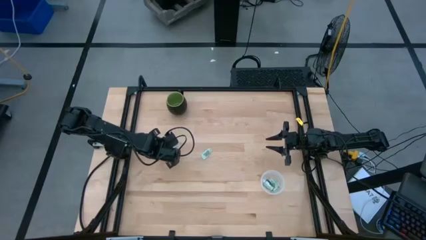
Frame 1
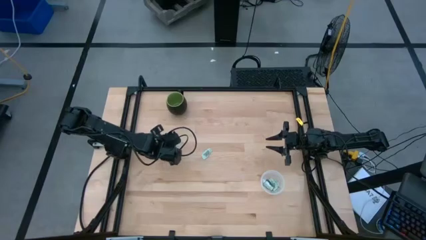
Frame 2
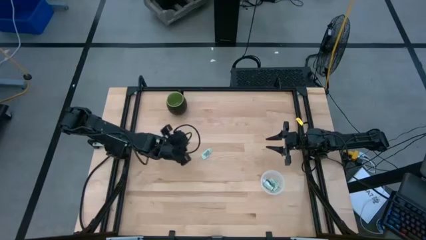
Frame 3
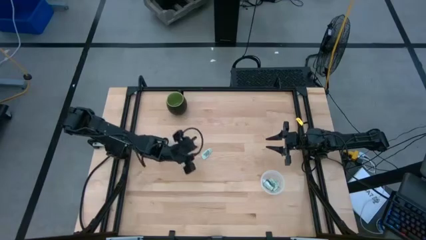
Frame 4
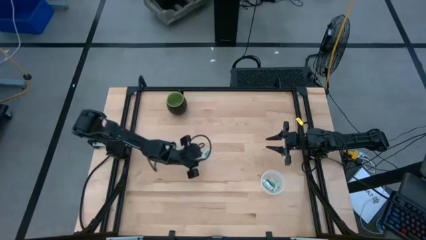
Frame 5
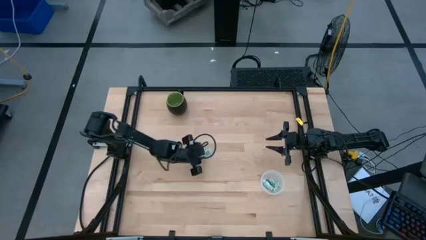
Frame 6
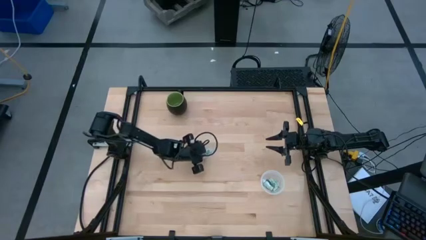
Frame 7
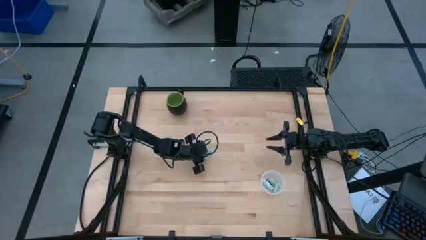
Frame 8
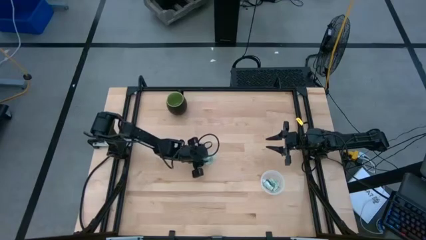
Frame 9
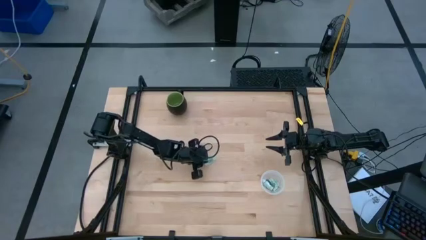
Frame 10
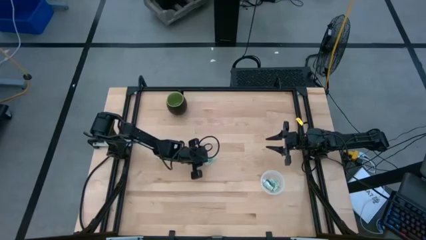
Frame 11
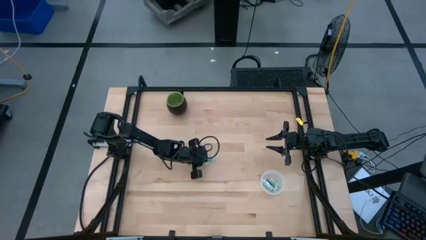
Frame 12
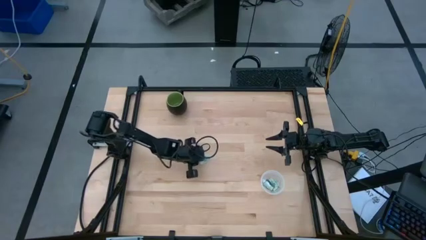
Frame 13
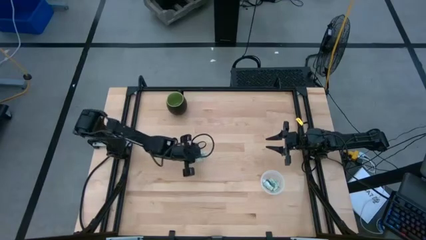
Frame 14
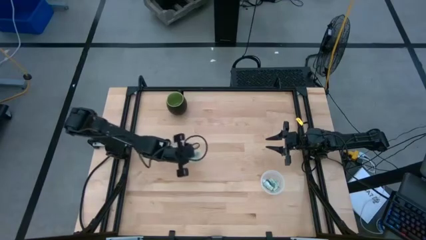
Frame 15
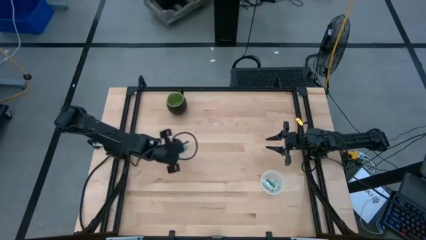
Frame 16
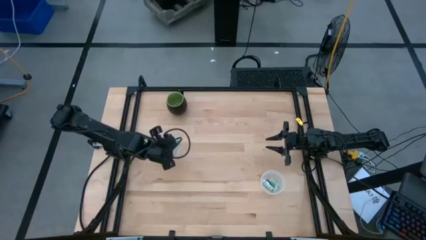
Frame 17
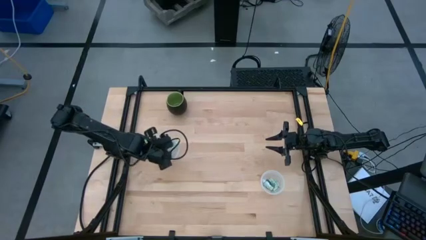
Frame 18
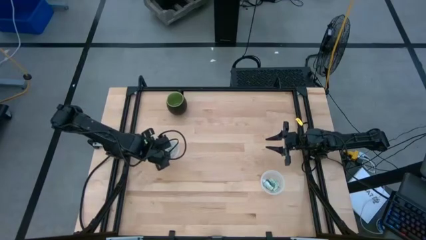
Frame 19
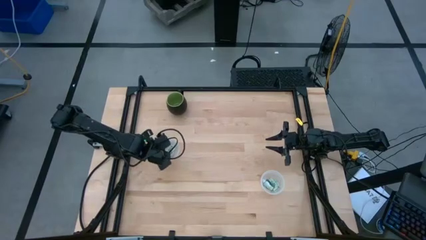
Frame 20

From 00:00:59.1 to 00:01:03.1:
Task: Pick and place Stevia / Truvia into bins
Put the white stevia packet into the left transparent container

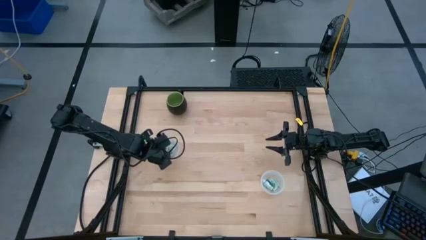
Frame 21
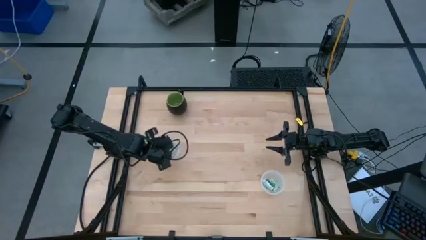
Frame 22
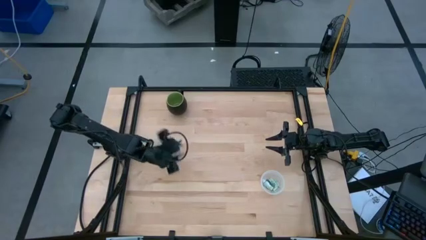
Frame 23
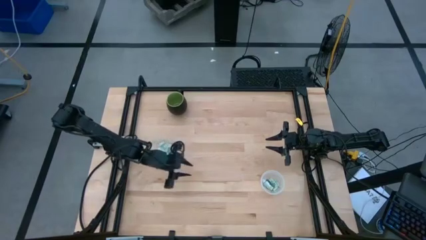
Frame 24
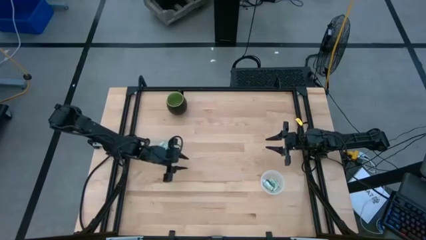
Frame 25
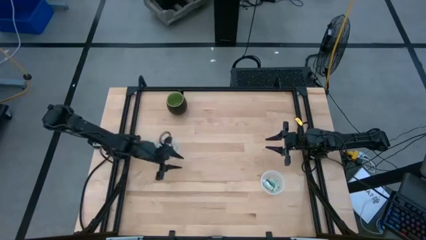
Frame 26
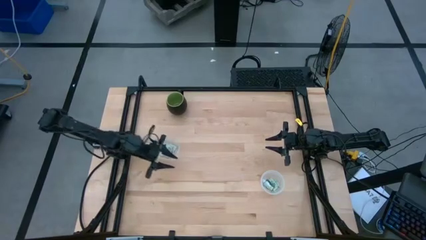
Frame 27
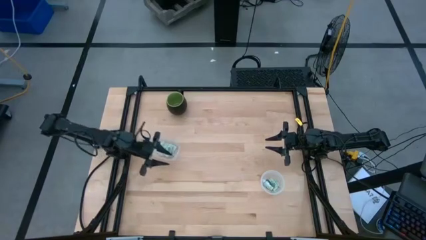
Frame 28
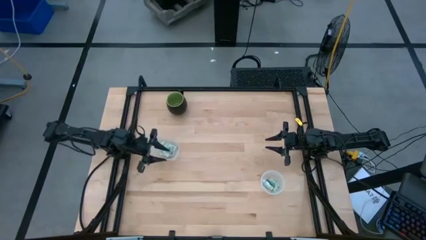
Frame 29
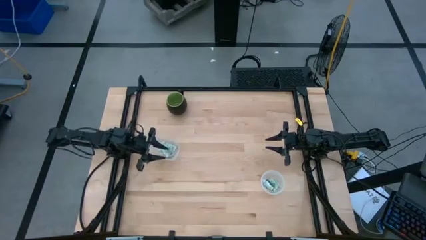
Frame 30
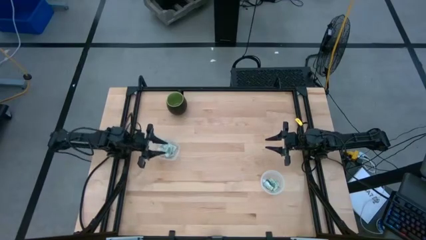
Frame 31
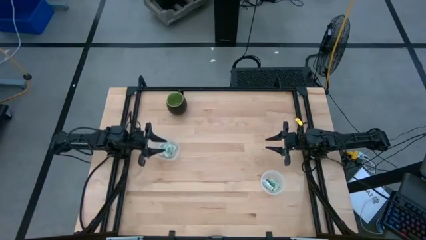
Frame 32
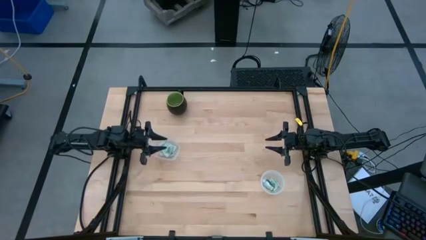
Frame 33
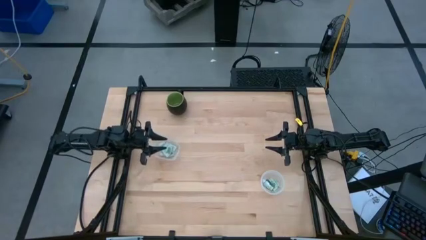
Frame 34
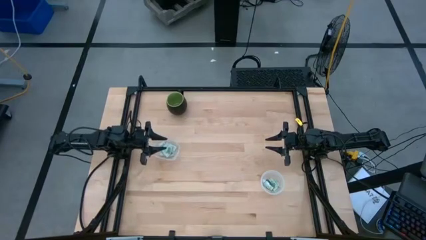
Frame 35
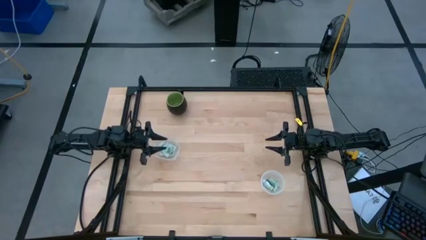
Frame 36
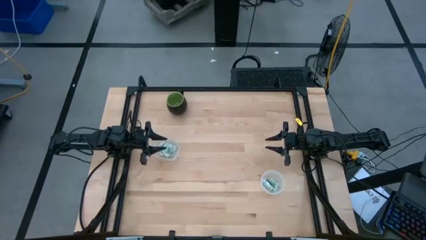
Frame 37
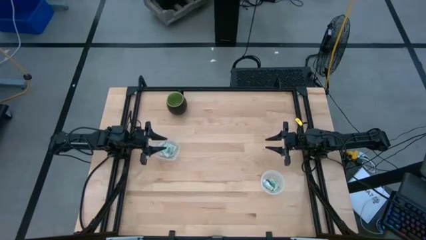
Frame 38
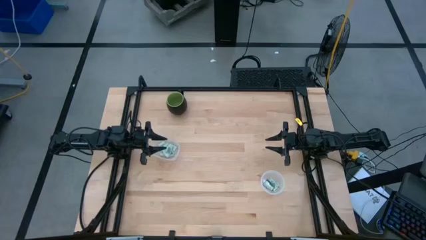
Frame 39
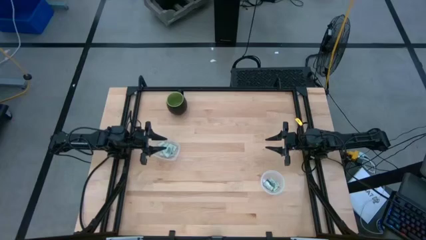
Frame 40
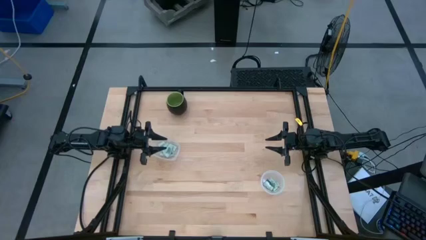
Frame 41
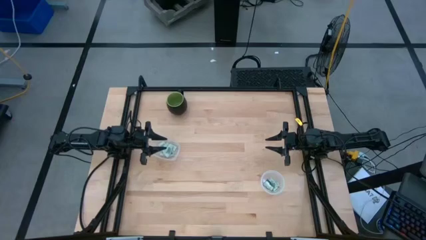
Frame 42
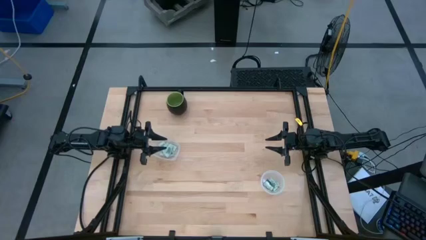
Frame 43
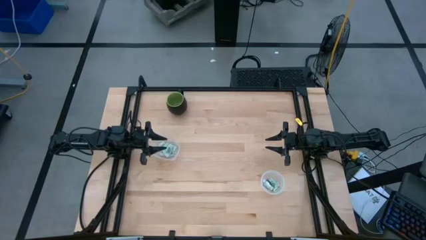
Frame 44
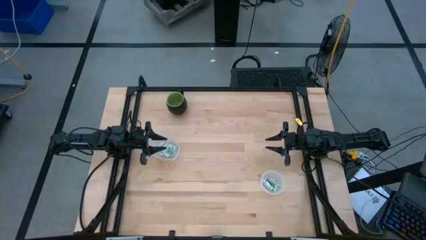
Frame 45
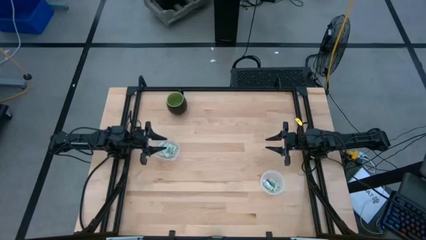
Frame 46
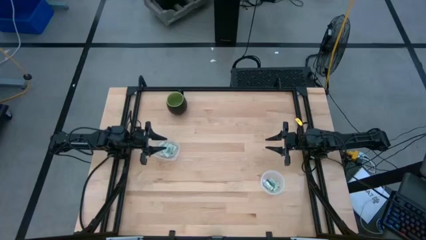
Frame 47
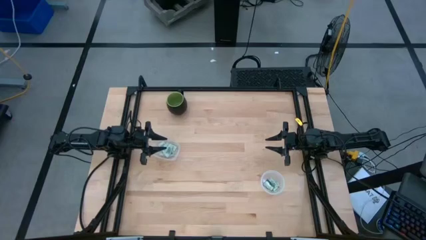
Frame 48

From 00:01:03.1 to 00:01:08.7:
Return to Home Position

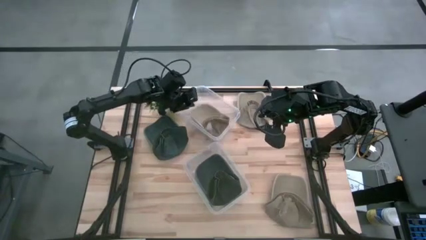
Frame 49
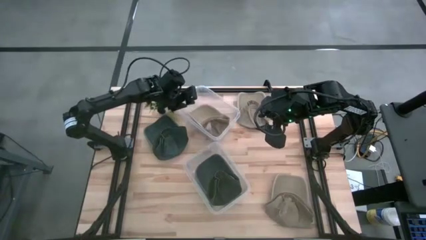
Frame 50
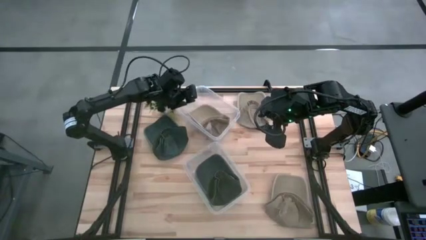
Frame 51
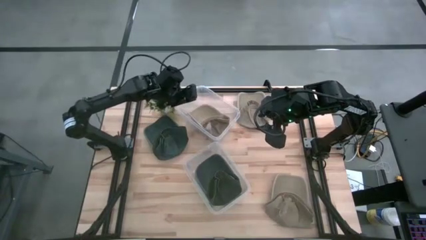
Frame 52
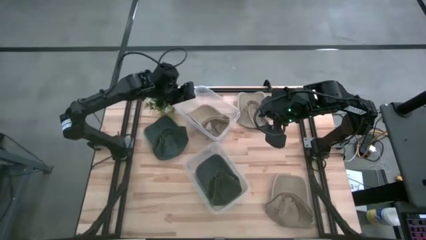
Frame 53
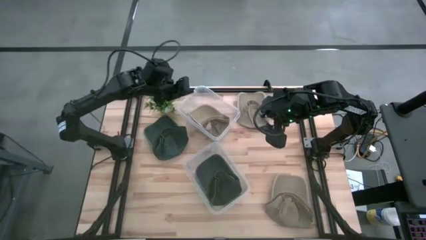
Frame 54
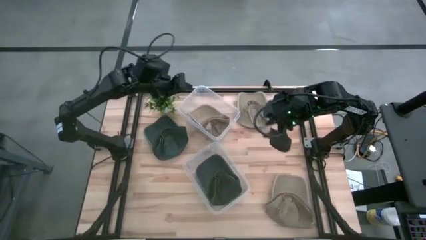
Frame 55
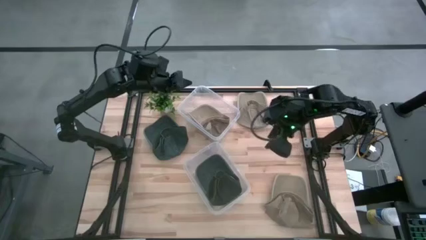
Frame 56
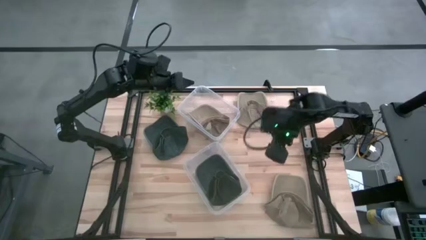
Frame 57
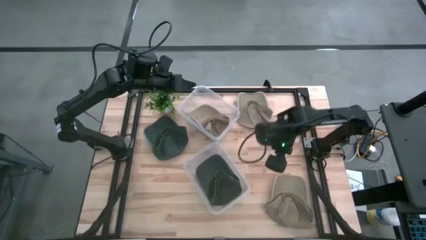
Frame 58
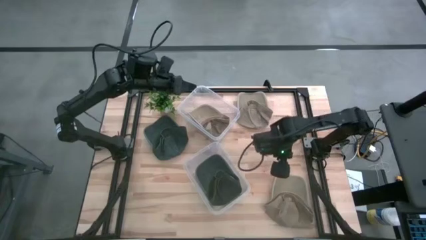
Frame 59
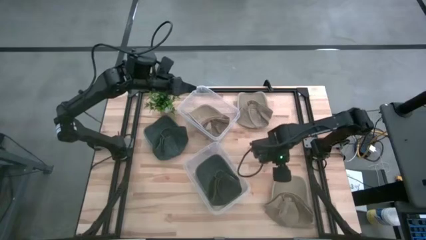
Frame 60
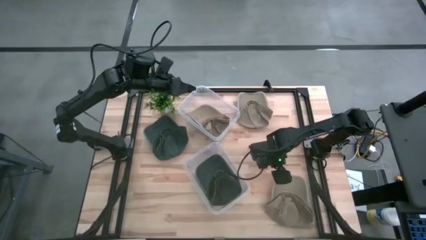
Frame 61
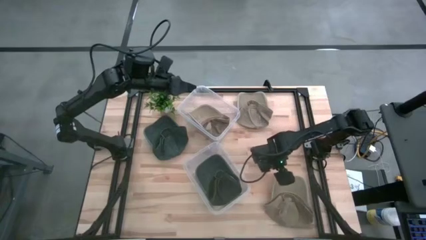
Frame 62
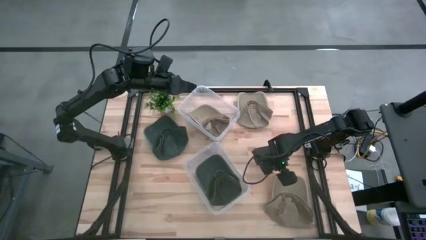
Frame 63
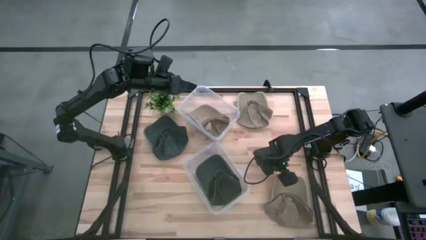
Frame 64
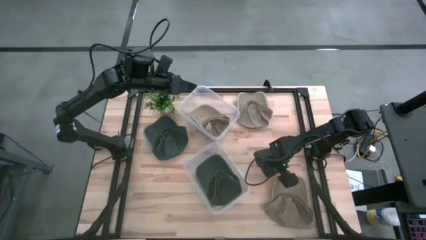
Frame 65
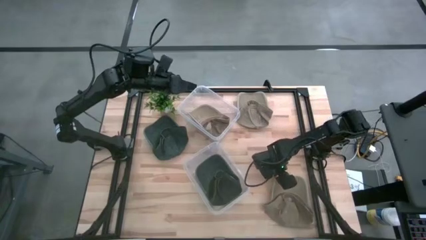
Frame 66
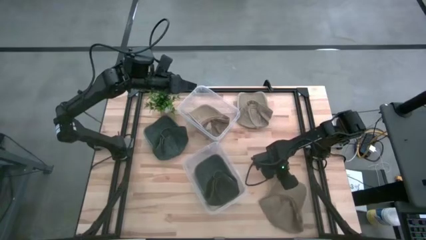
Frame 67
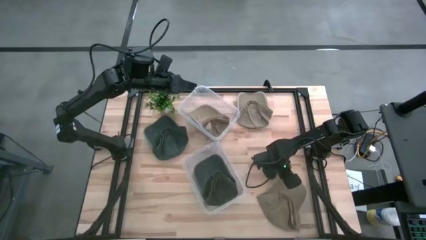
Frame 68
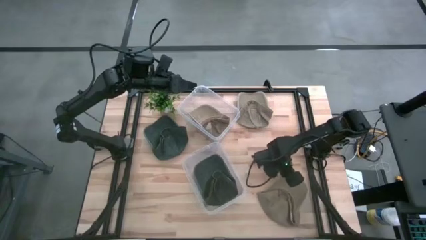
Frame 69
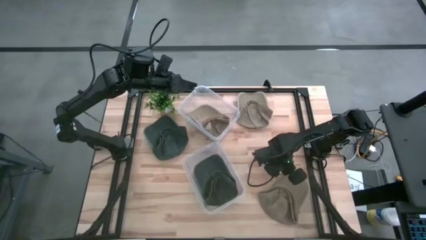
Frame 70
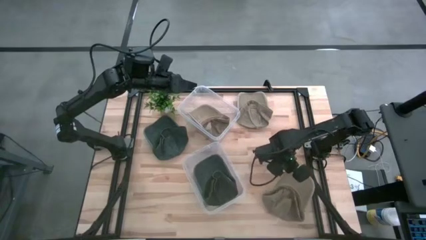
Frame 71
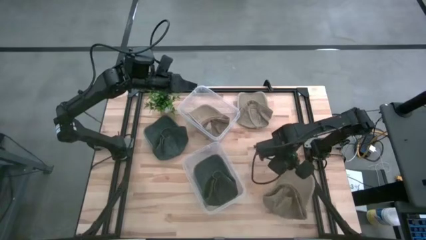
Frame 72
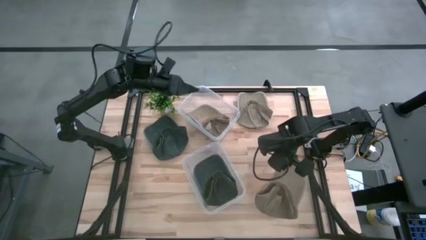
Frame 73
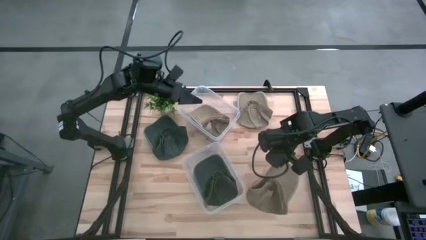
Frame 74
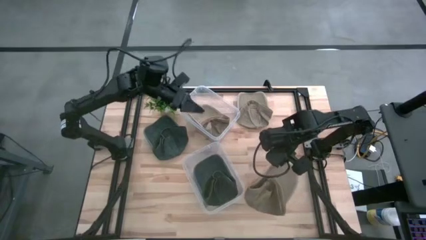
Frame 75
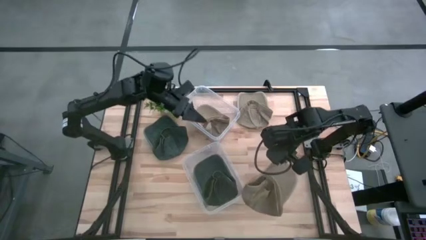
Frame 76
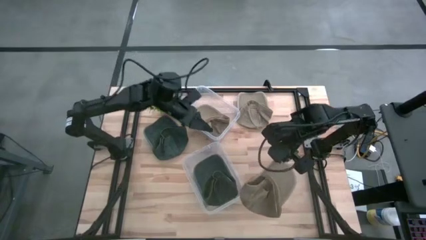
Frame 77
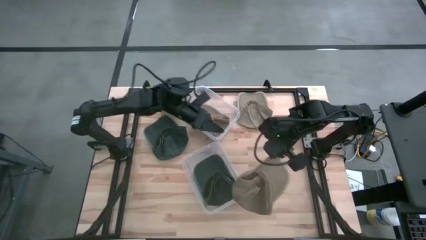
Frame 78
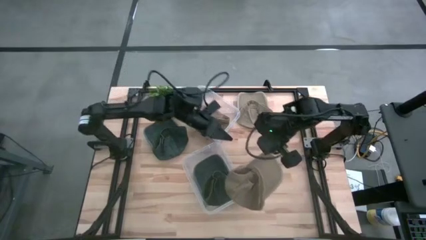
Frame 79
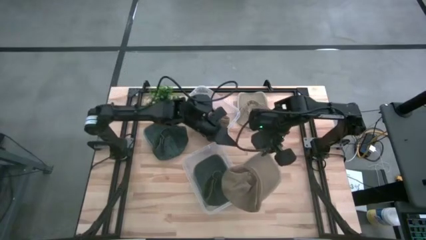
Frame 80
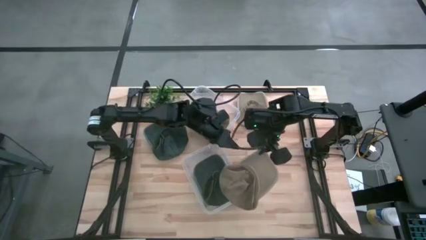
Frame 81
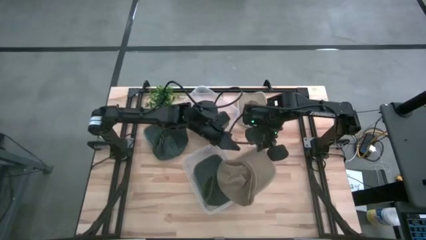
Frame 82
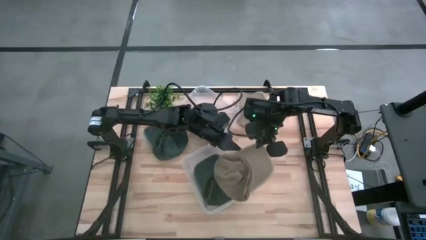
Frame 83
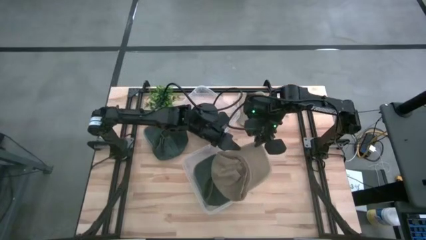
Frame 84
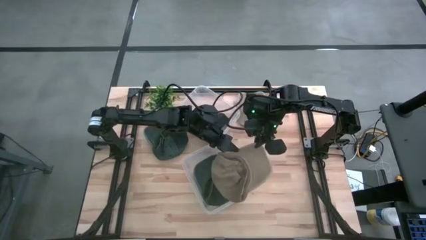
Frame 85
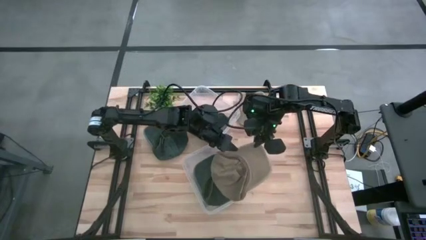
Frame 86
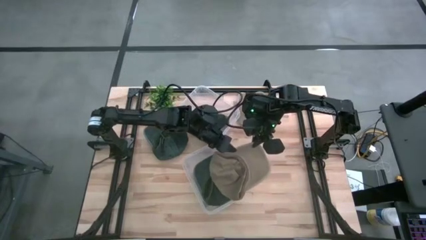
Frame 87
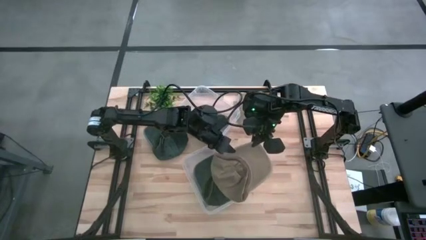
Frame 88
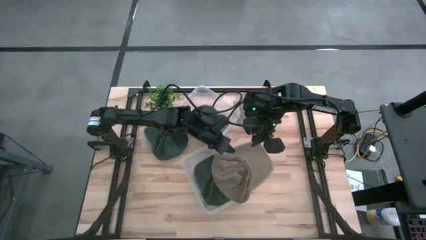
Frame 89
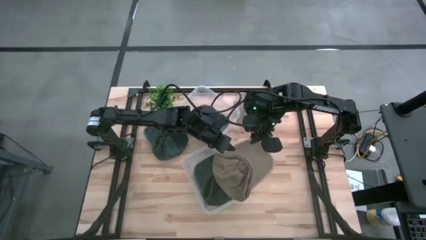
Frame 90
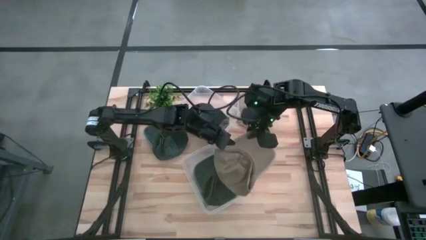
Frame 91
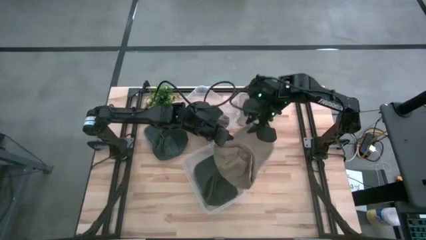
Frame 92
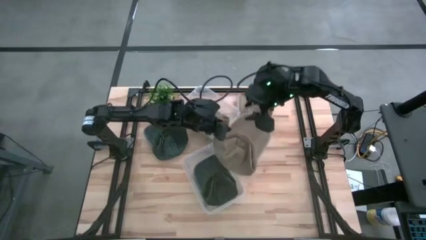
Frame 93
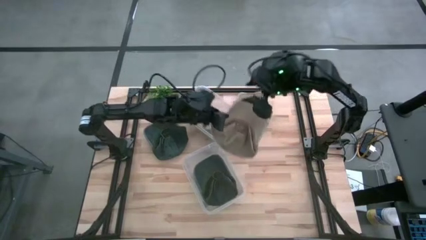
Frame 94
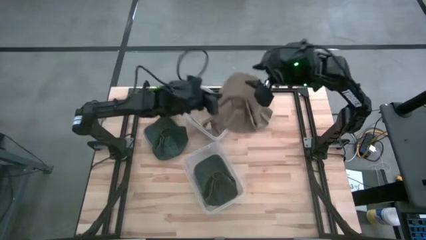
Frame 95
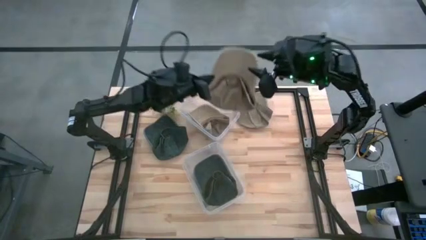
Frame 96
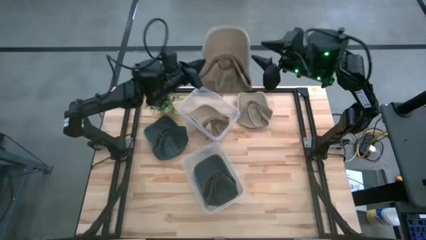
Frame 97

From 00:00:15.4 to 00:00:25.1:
Task: Pick & Place hat
Put the bottom brown cap into the top transparent bin
